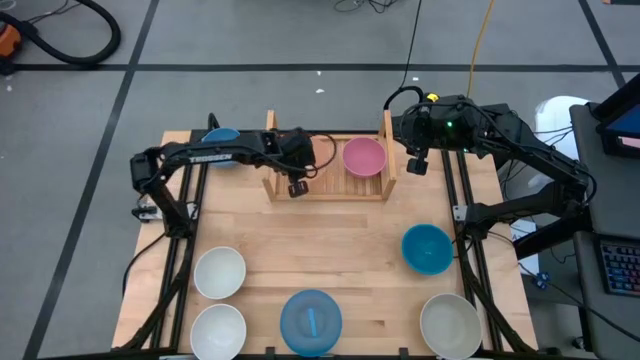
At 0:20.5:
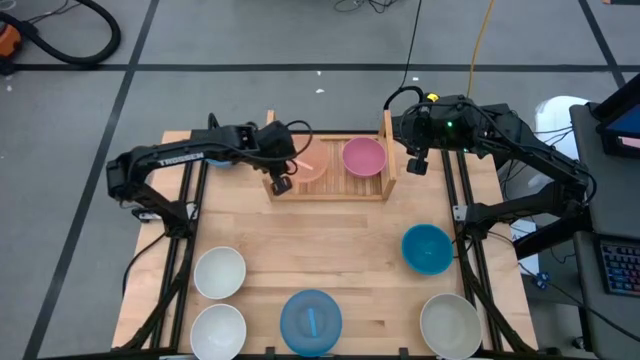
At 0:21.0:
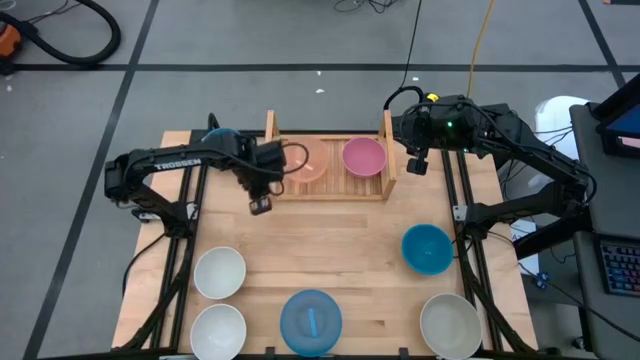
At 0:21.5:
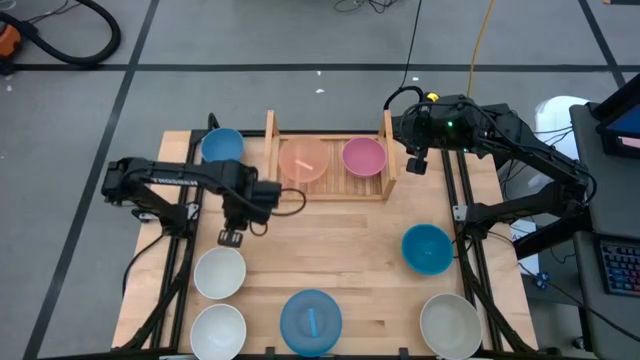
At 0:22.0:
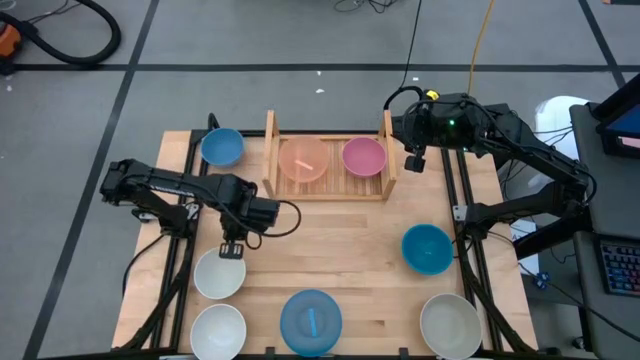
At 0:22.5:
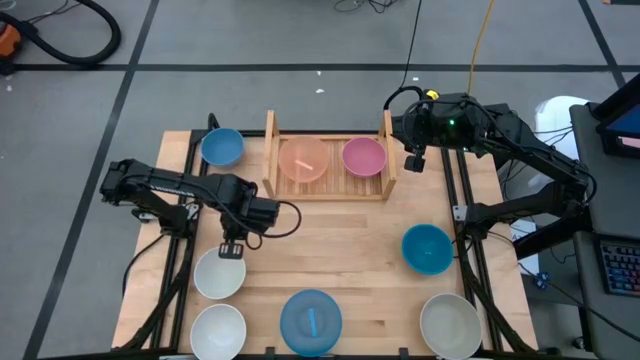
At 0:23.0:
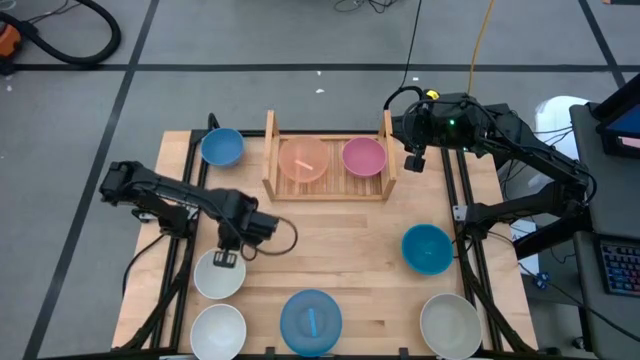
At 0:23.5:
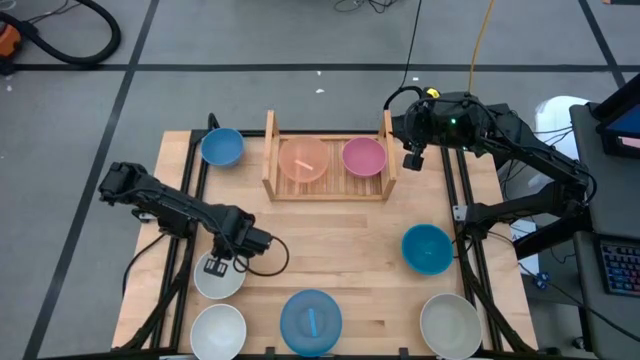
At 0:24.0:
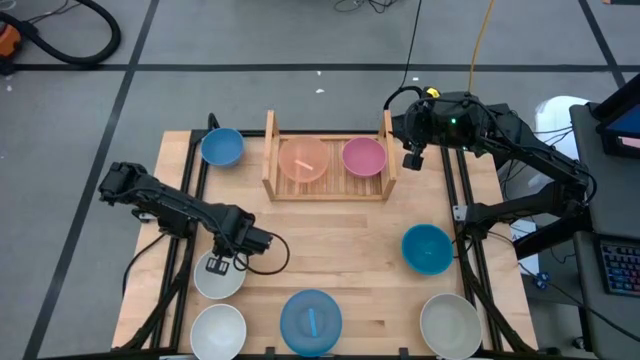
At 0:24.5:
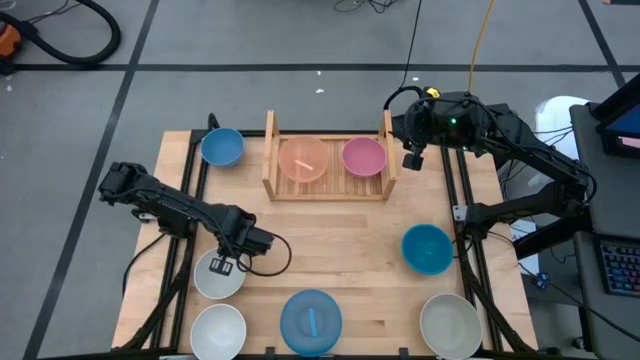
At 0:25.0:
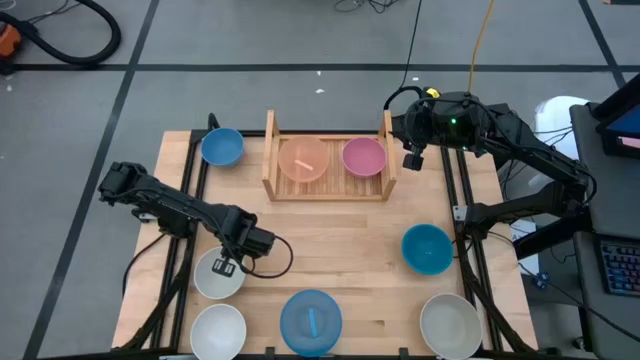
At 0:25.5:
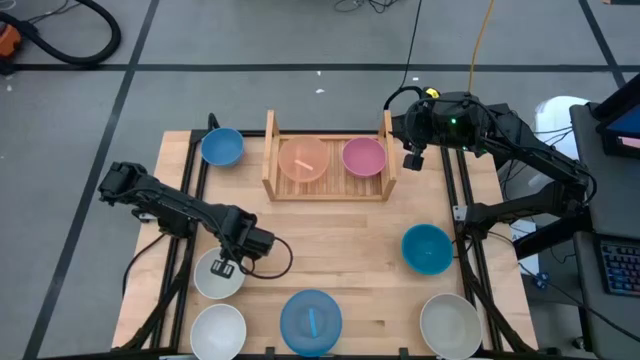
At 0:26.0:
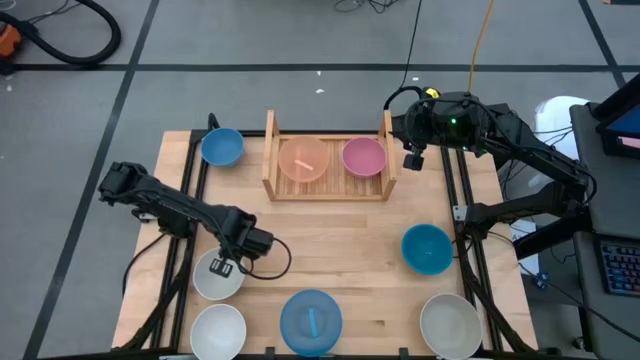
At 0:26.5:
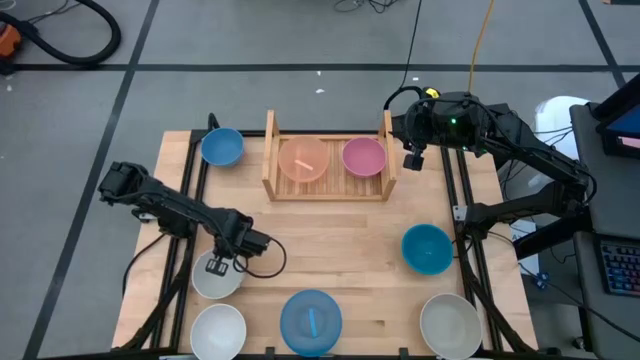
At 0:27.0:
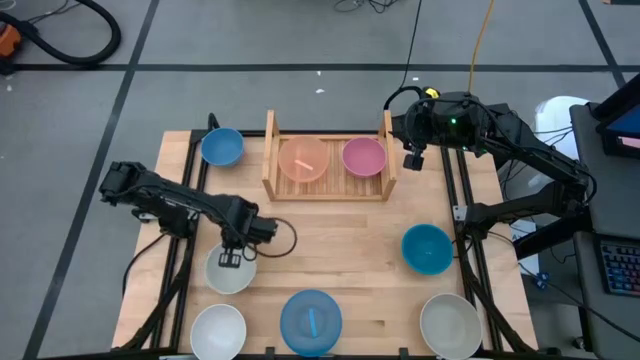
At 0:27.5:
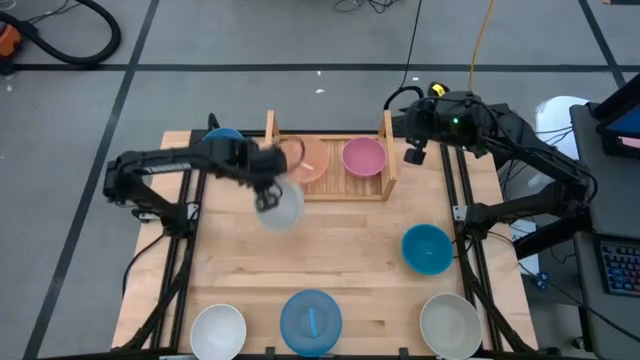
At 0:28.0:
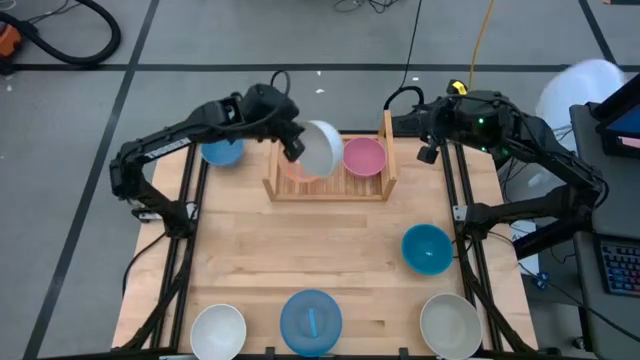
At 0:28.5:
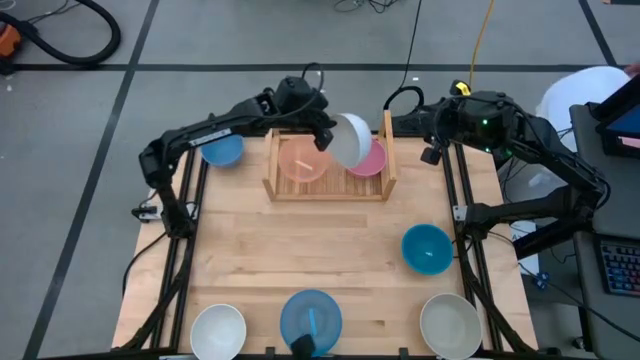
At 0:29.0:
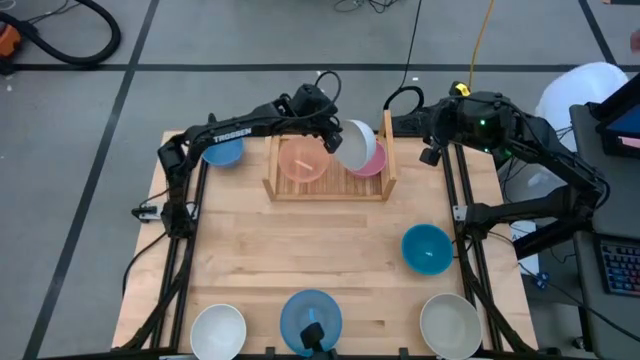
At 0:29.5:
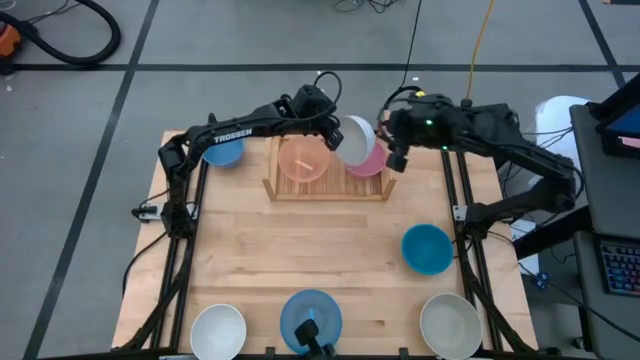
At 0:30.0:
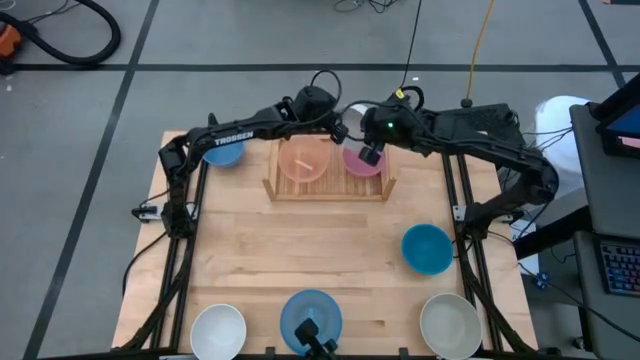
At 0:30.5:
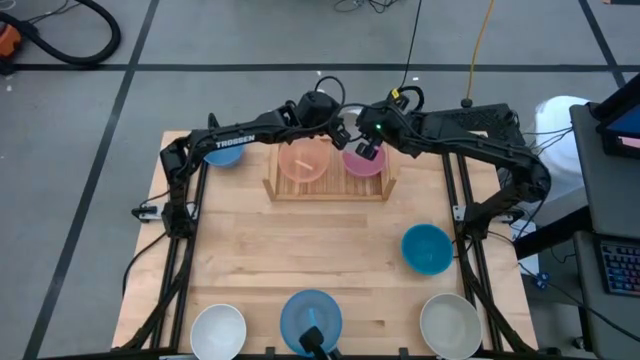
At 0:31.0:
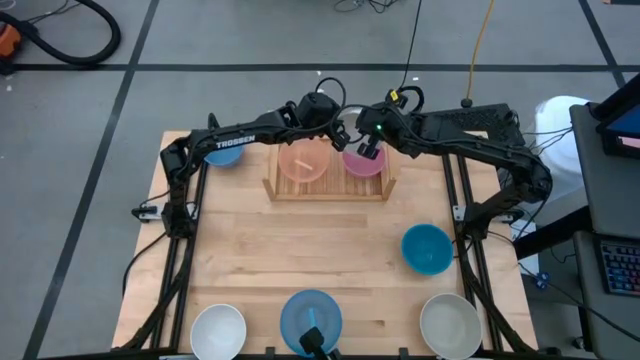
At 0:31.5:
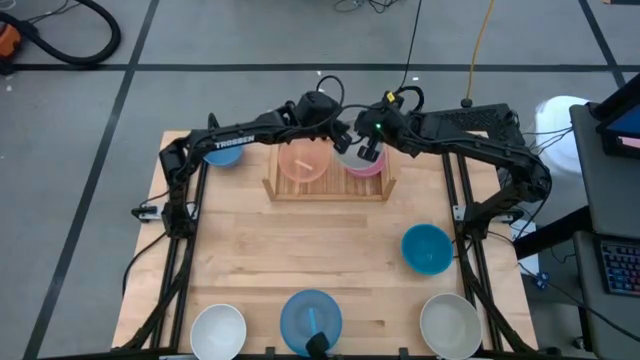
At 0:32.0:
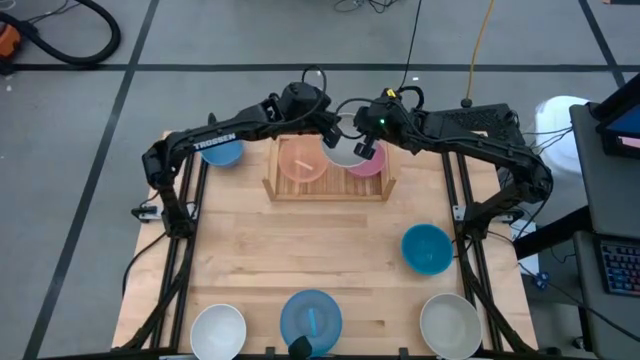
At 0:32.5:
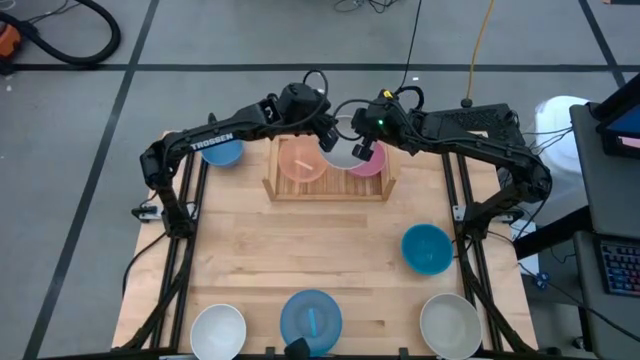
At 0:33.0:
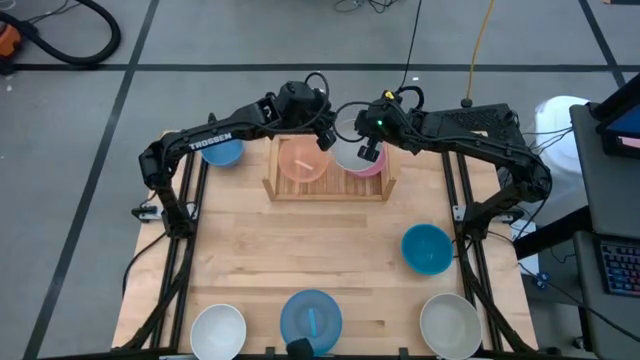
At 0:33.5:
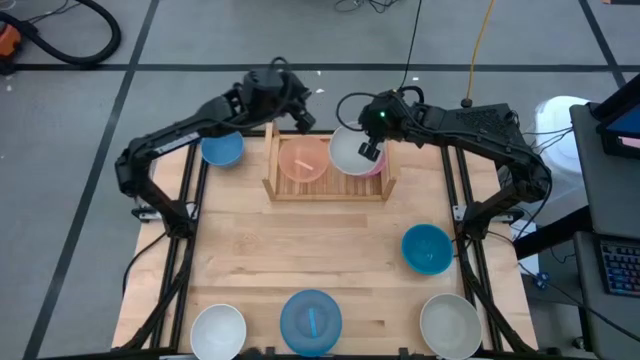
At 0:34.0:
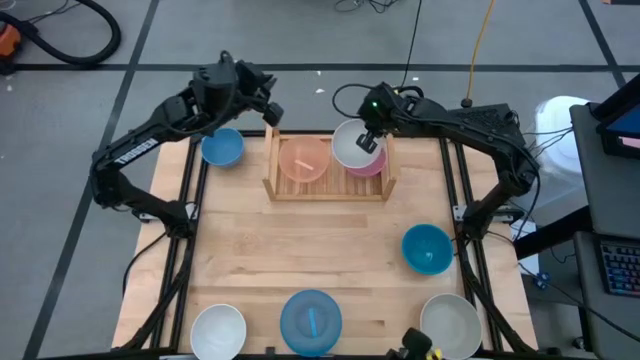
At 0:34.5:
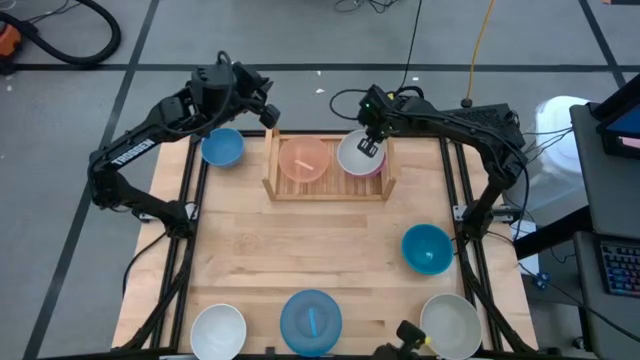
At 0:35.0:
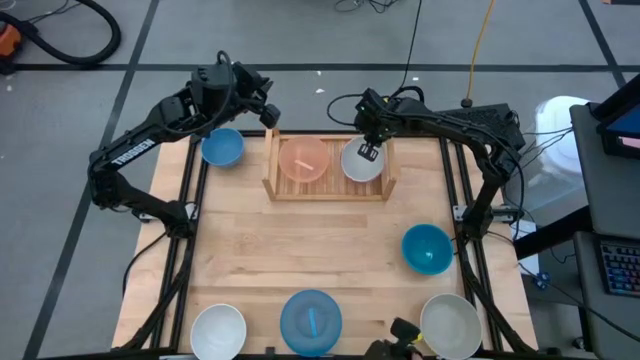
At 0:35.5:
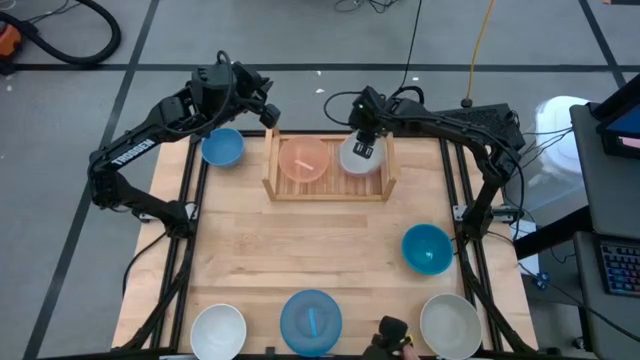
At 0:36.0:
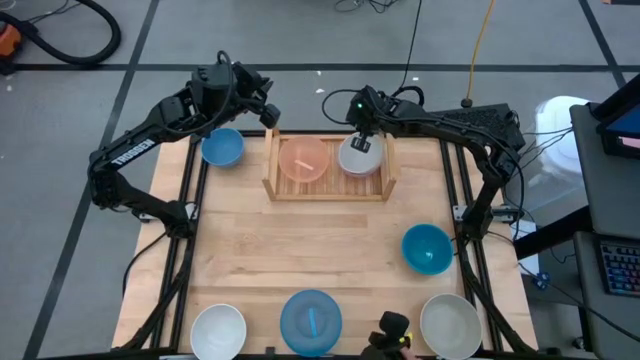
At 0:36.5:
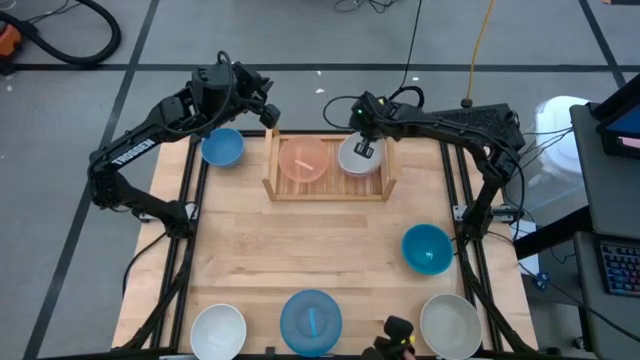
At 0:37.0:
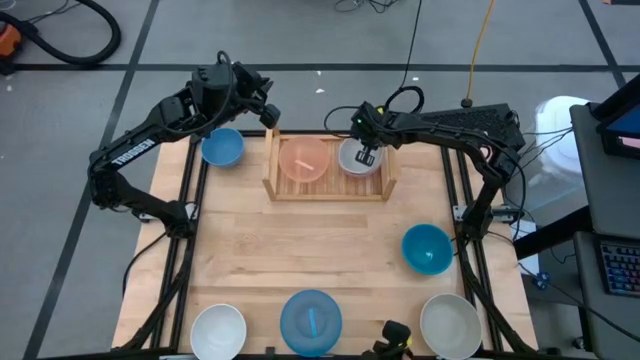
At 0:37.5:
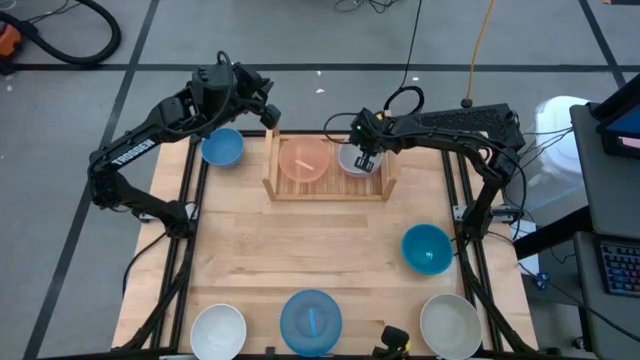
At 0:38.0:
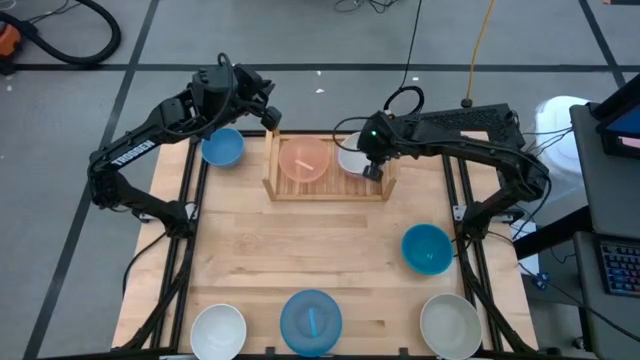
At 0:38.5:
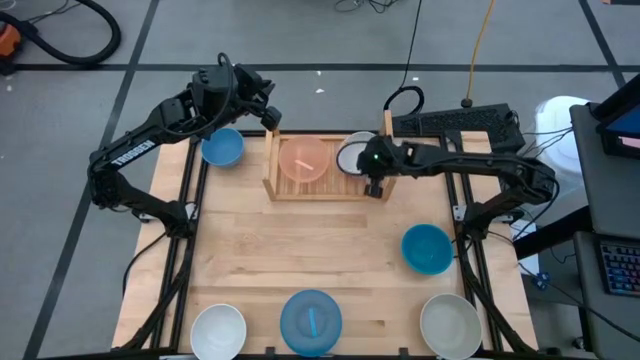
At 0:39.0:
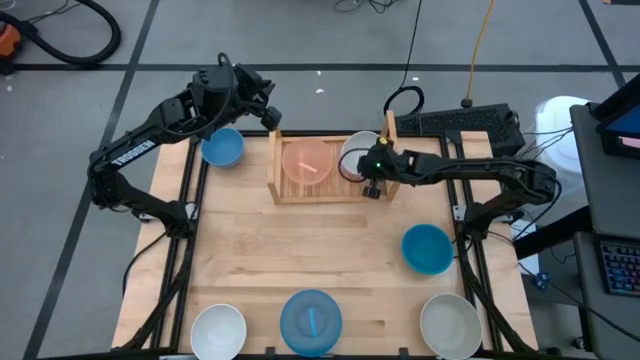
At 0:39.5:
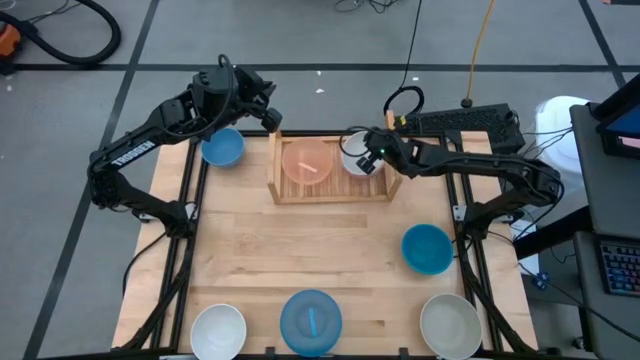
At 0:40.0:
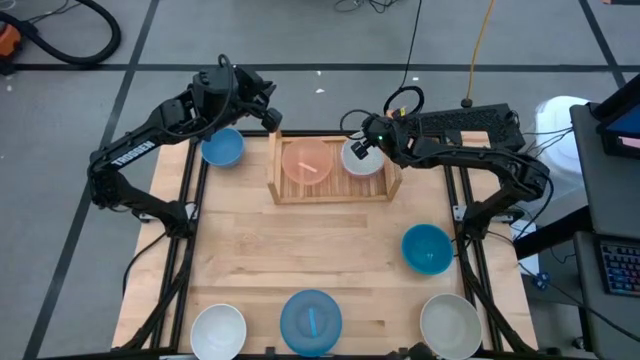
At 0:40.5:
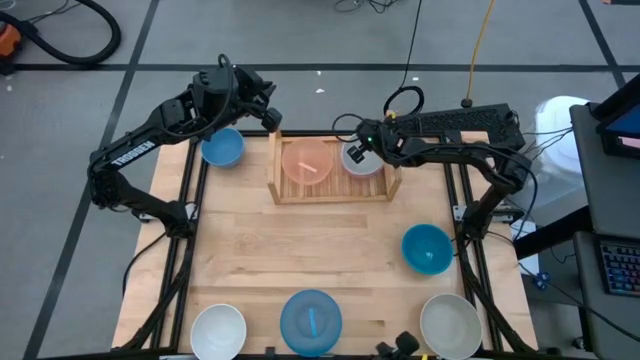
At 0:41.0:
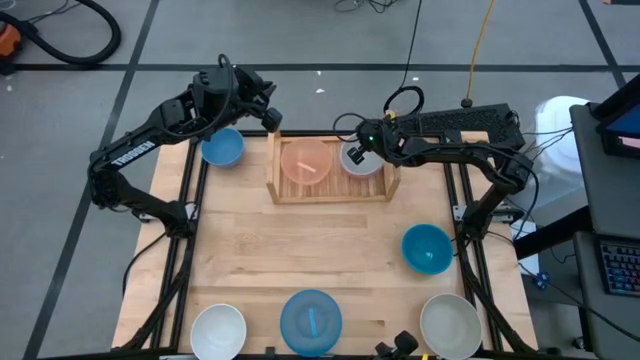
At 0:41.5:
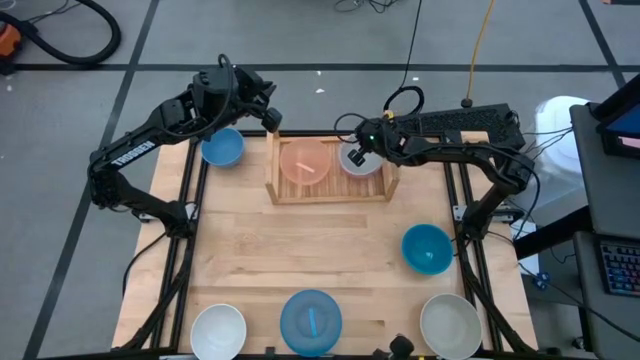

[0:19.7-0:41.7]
Task: Place and stack bowls onto a shelf
Stack the top white bowl on top of the pink bowl on the shelf
